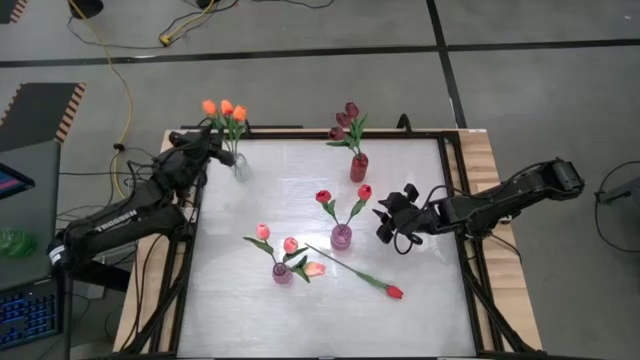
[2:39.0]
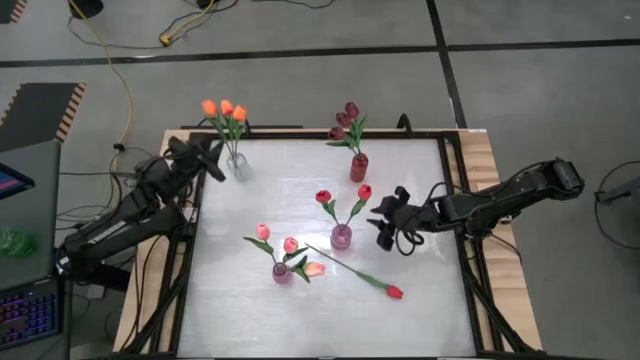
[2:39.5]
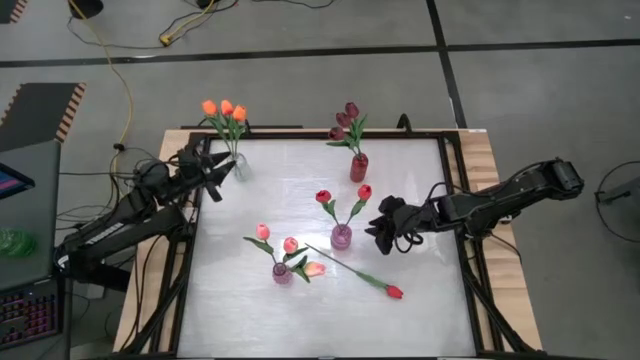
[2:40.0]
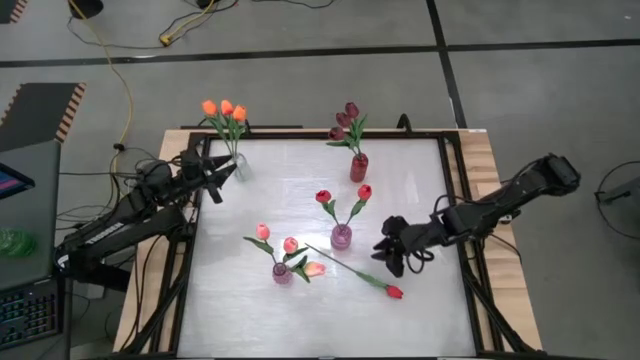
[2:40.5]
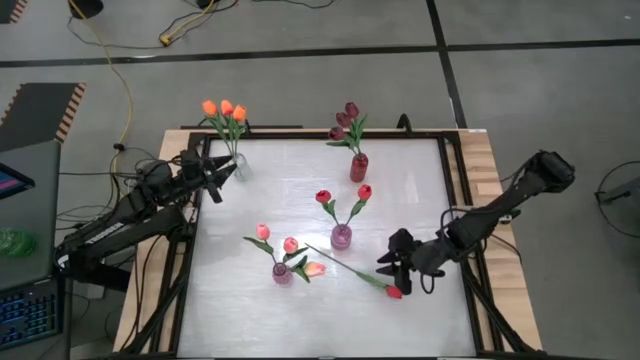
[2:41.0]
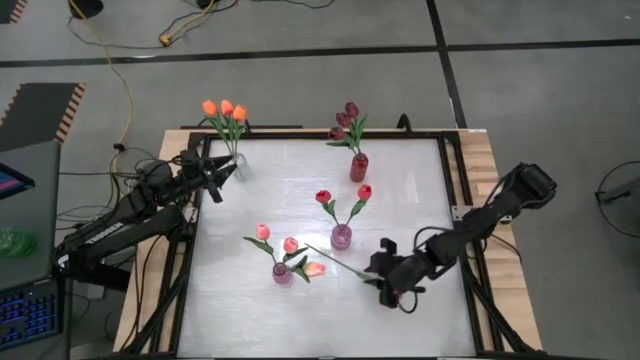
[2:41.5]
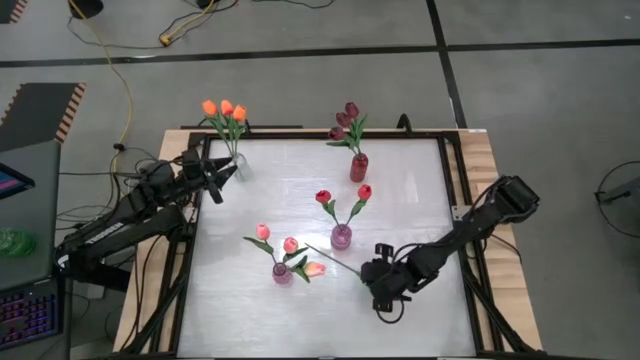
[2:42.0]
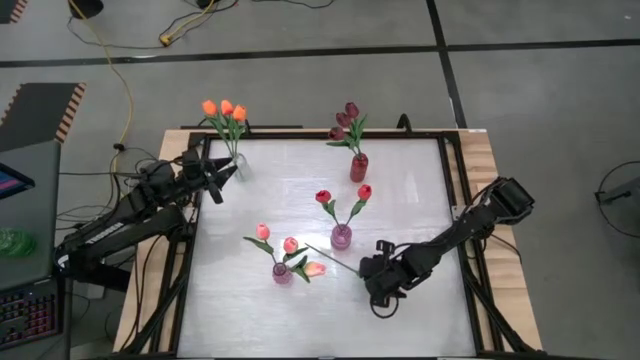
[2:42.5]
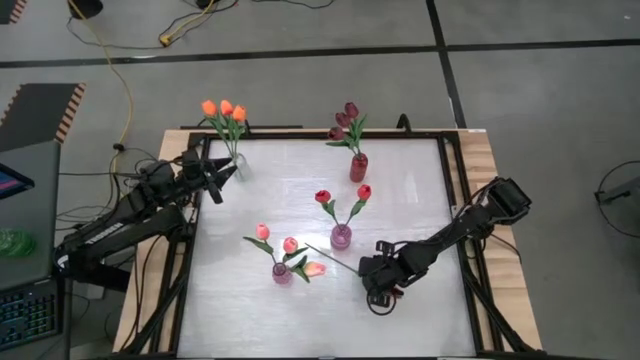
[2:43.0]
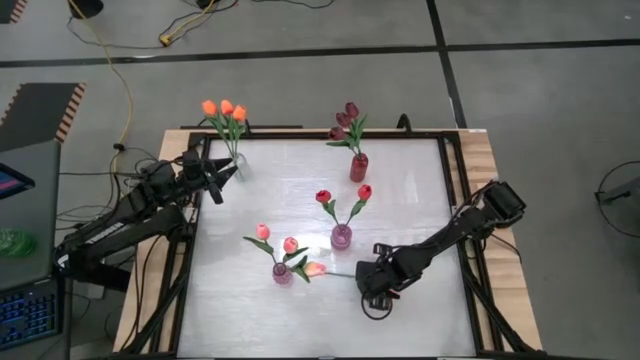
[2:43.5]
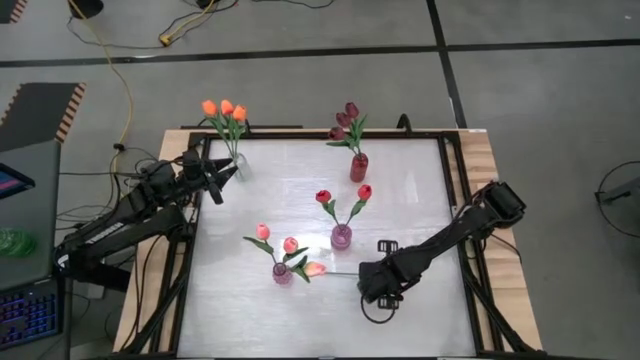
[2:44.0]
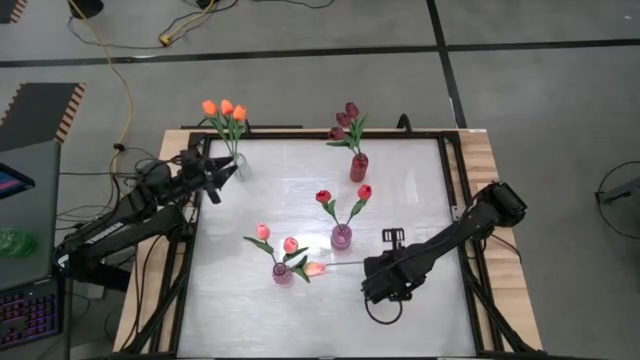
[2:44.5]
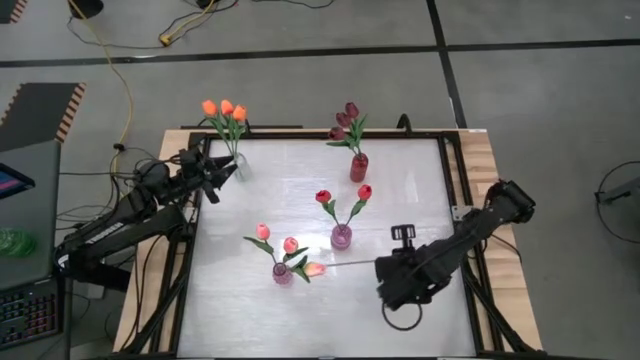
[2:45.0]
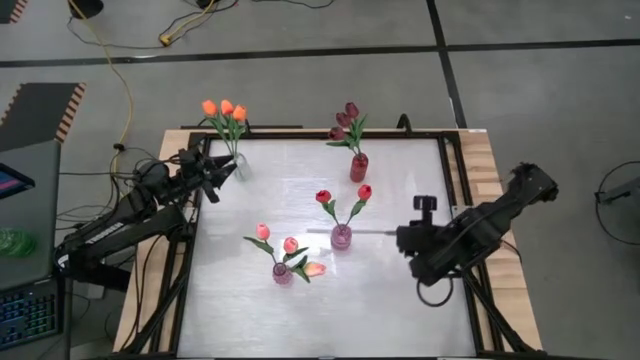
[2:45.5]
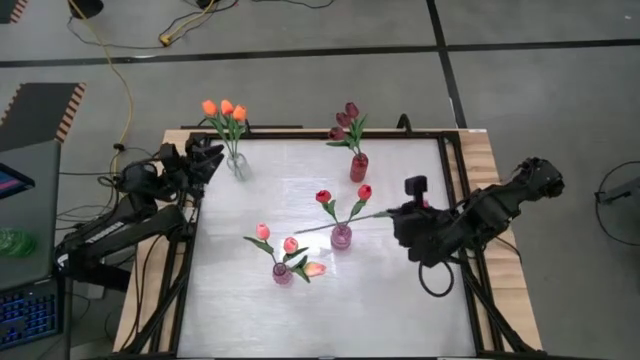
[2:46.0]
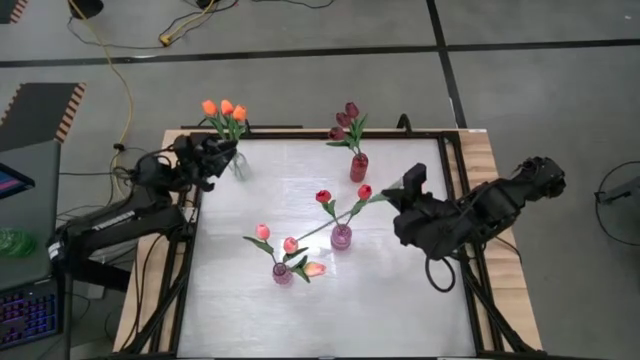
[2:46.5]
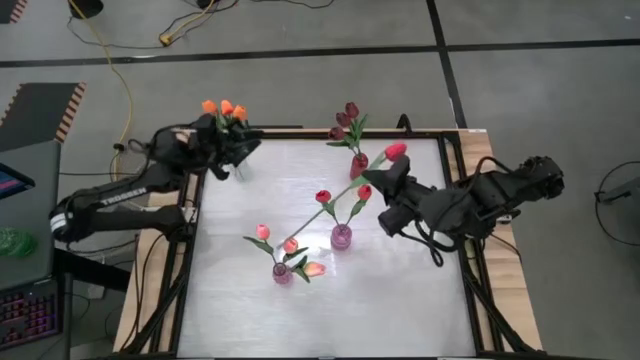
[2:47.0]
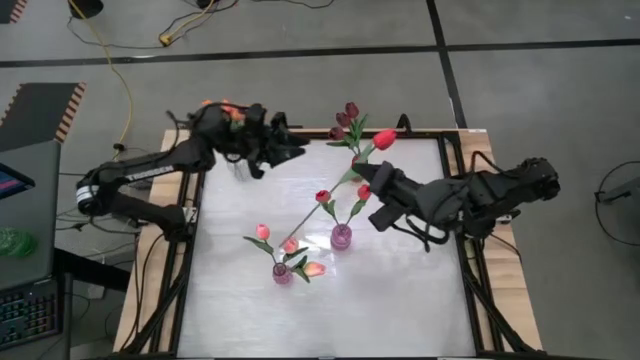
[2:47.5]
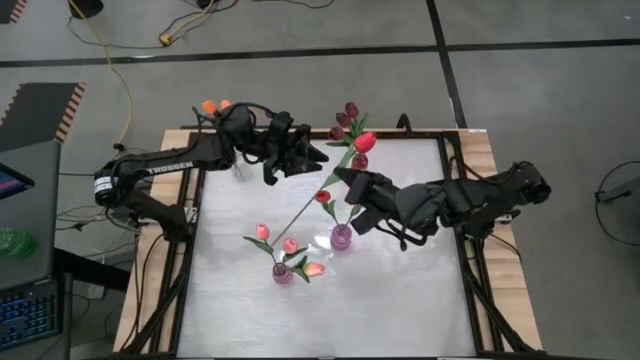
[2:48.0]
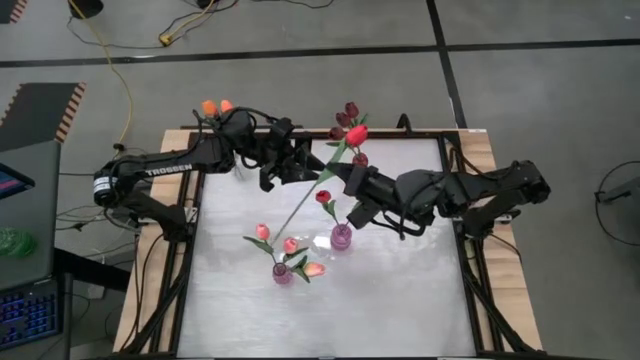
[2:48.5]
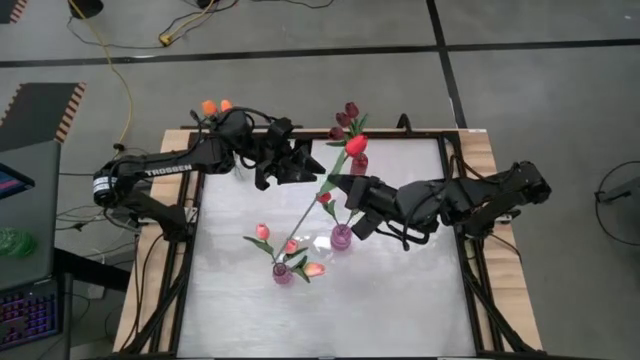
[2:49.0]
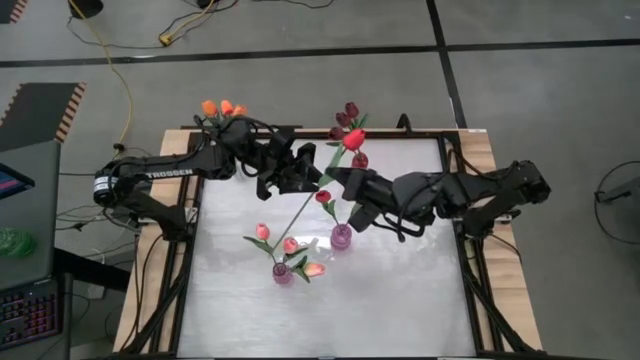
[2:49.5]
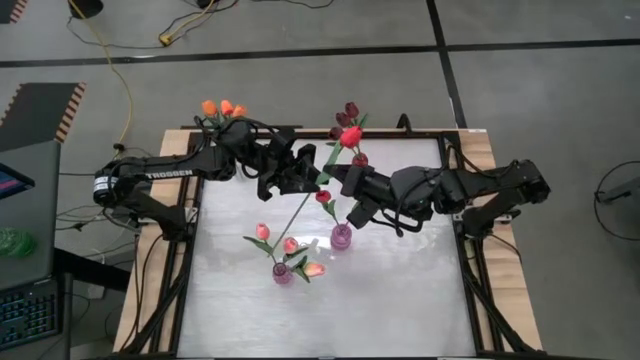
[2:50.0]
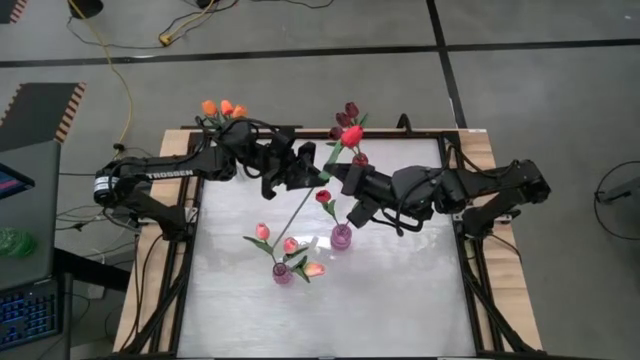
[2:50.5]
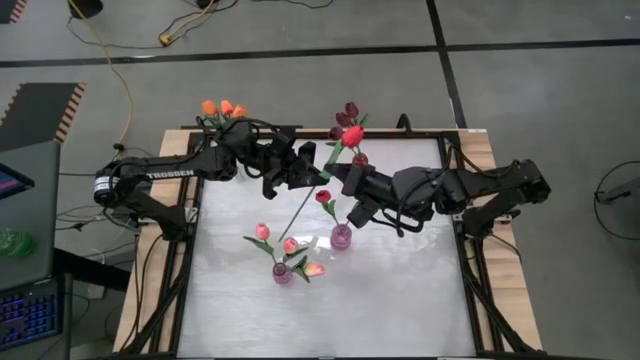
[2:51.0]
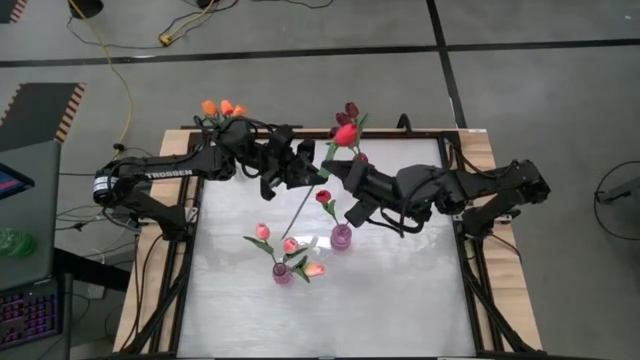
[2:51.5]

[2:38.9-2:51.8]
Task: Sort flowers into vase by color
Put the red flower into the top purple vase

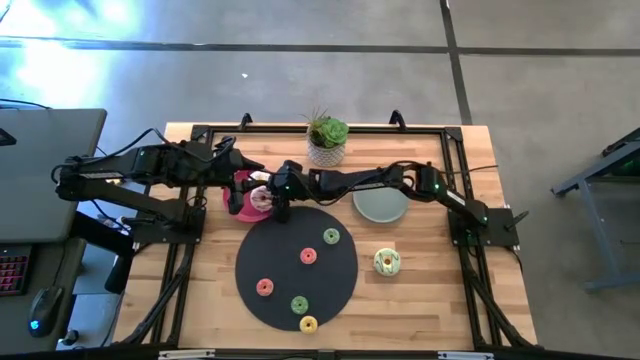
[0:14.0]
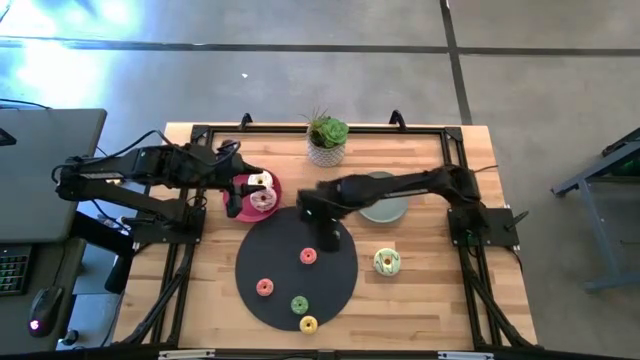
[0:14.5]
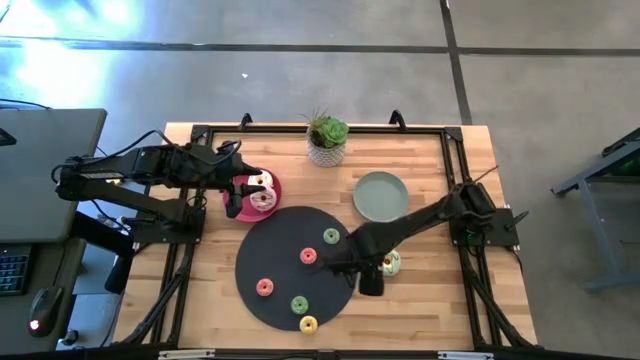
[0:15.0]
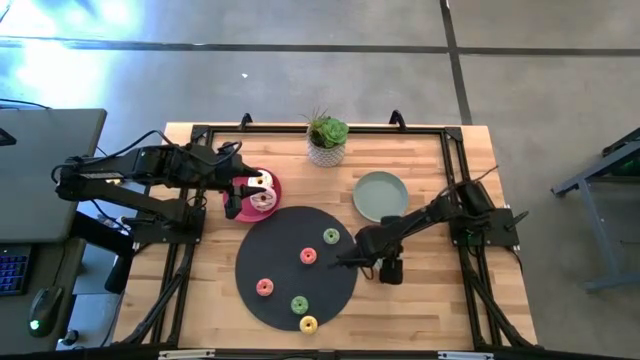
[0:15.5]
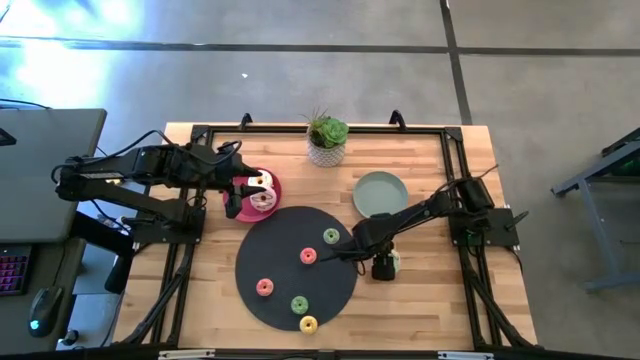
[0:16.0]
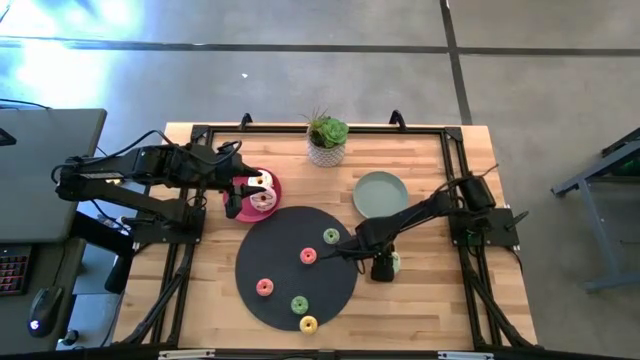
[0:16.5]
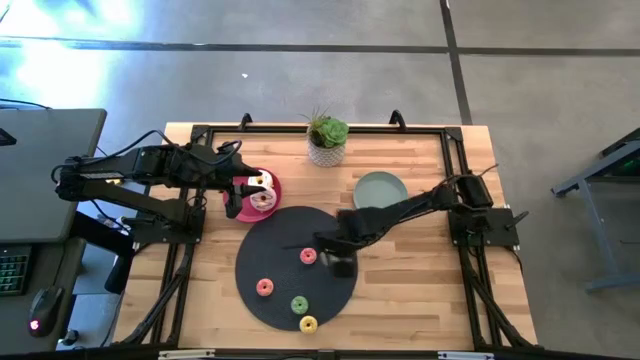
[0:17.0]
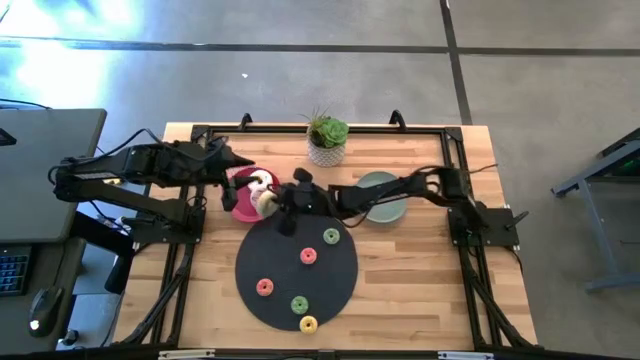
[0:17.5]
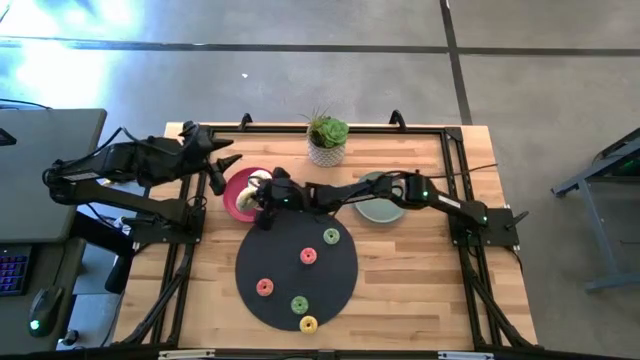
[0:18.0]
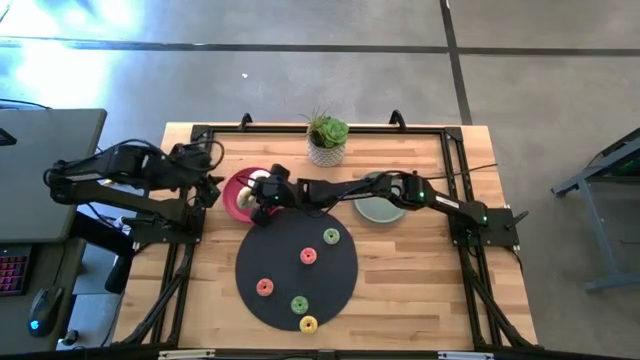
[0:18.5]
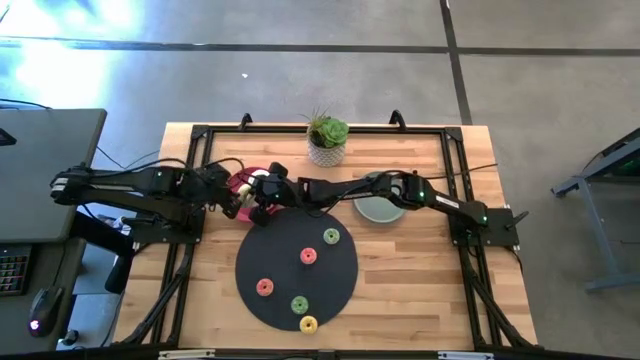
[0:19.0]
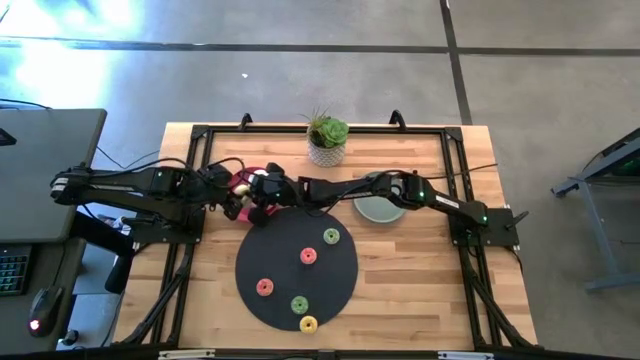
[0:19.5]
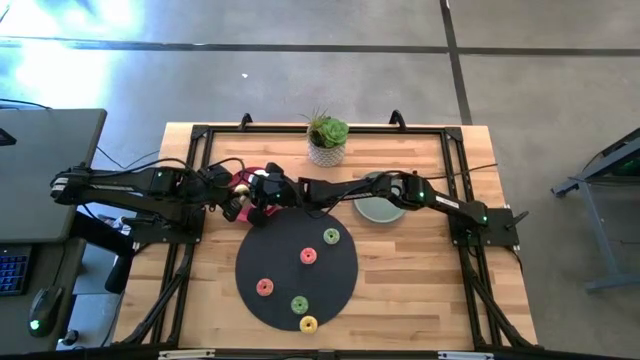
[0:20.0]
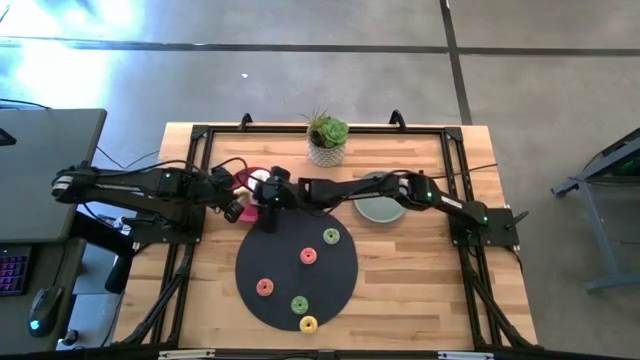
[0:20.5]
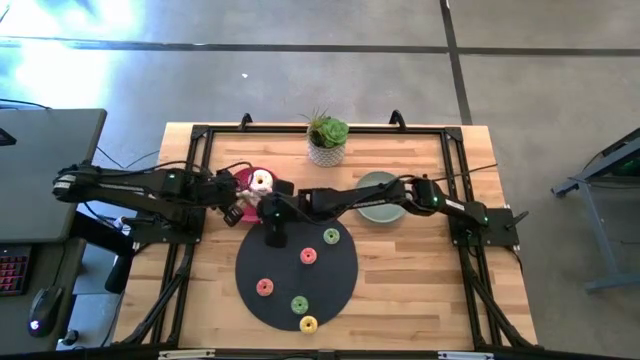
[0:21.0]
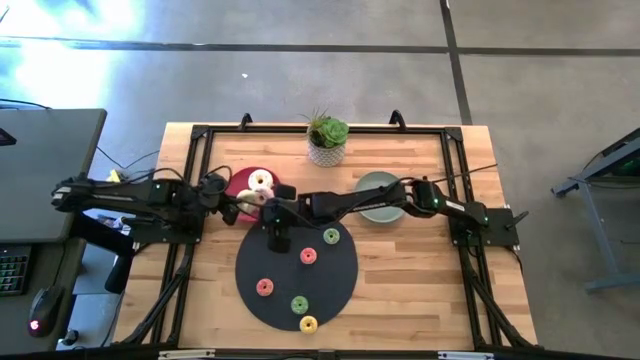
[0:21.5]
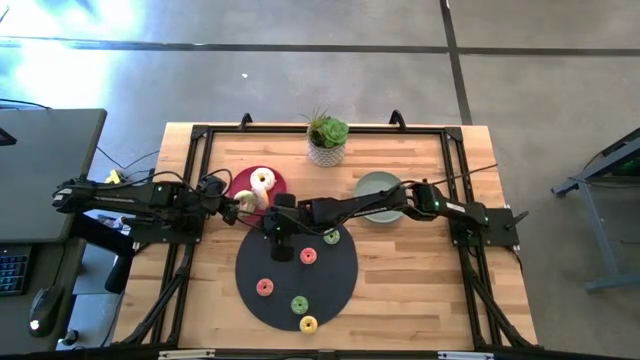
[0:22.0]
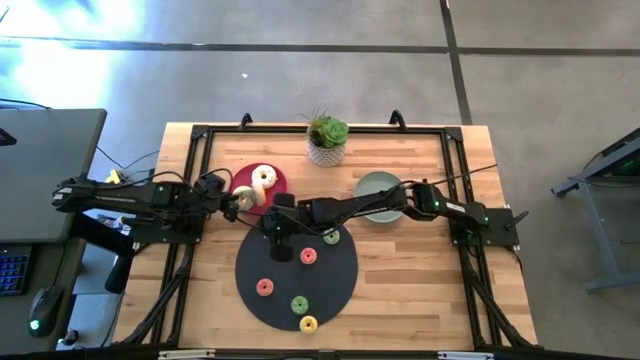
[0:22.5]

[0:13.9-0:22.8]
Task: Pick & Place donuts
Put the big blue donut on the red plate
